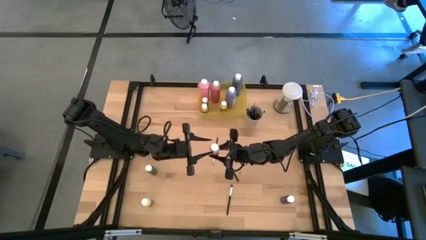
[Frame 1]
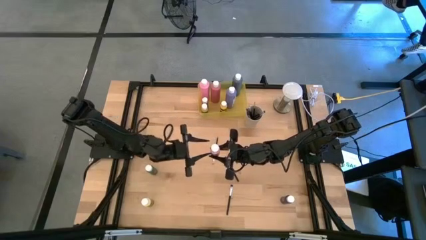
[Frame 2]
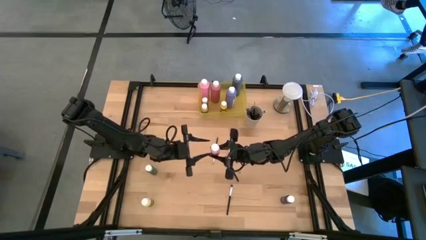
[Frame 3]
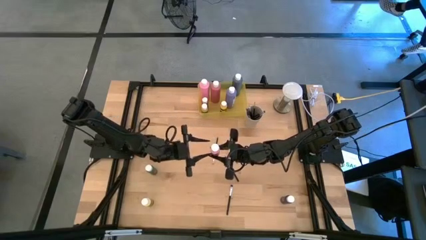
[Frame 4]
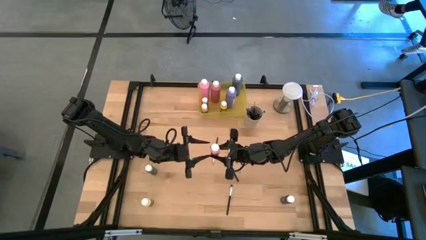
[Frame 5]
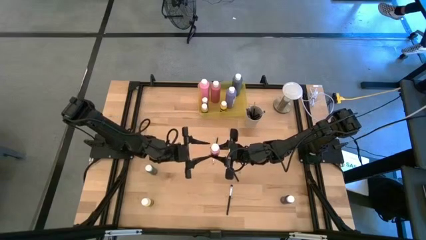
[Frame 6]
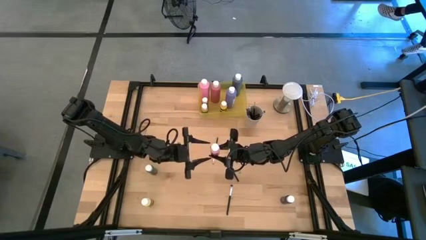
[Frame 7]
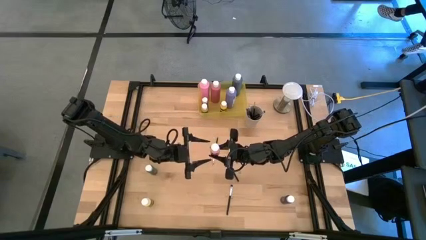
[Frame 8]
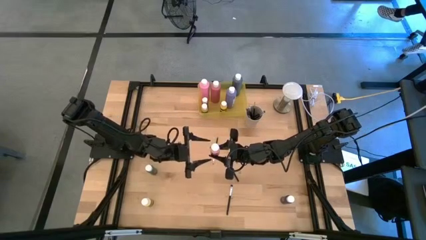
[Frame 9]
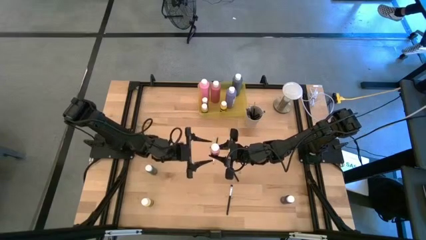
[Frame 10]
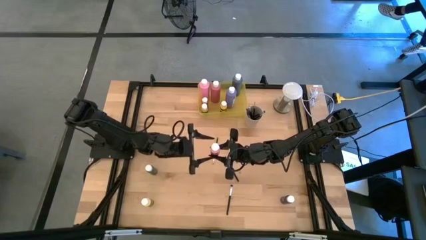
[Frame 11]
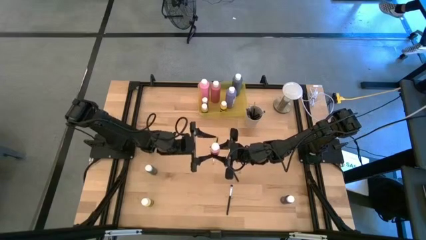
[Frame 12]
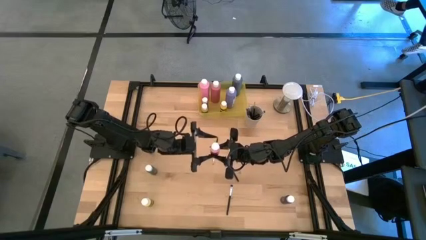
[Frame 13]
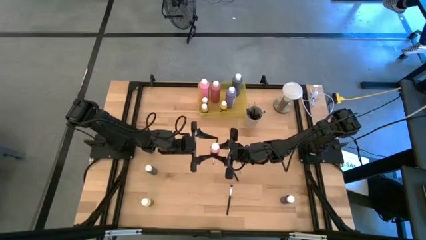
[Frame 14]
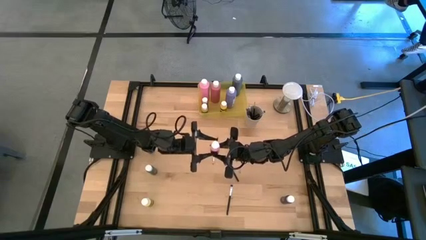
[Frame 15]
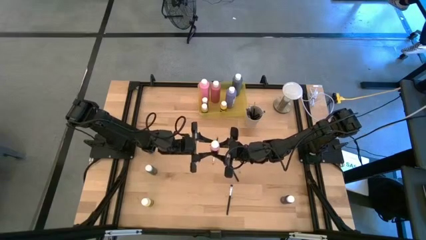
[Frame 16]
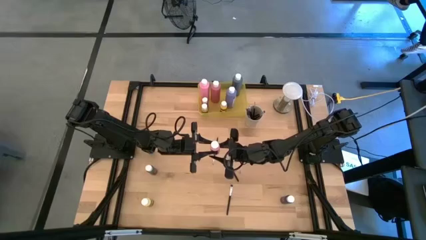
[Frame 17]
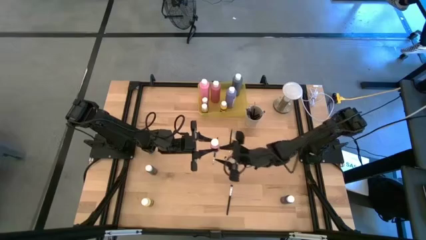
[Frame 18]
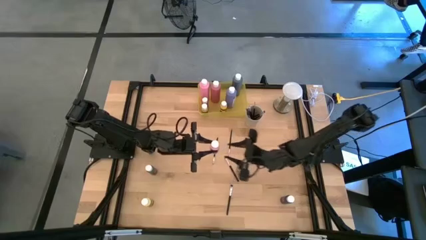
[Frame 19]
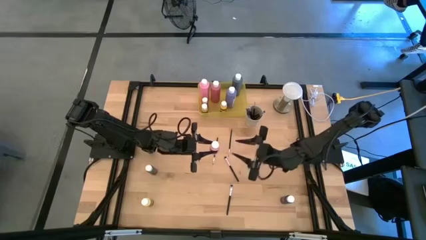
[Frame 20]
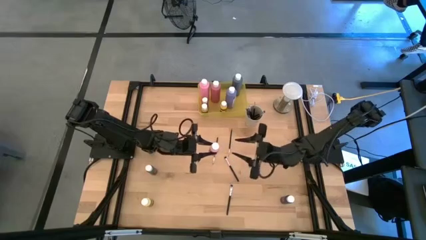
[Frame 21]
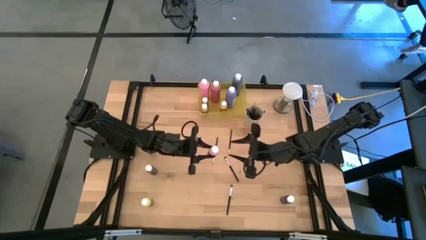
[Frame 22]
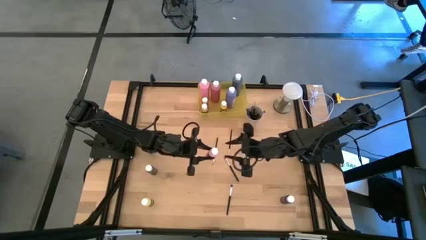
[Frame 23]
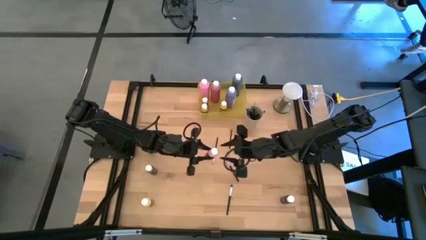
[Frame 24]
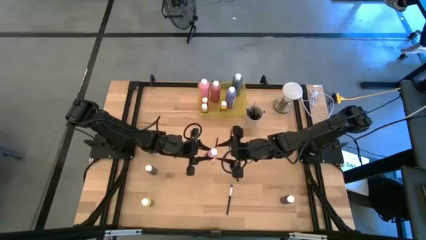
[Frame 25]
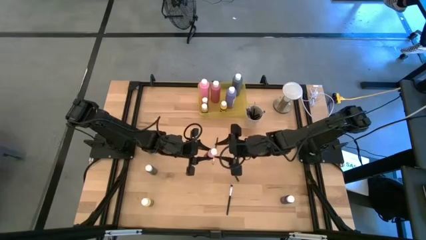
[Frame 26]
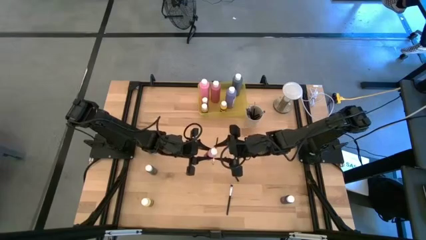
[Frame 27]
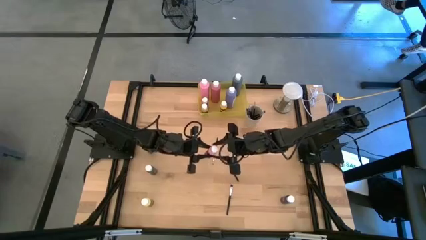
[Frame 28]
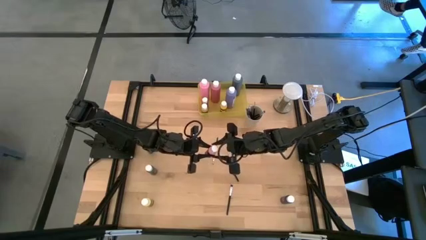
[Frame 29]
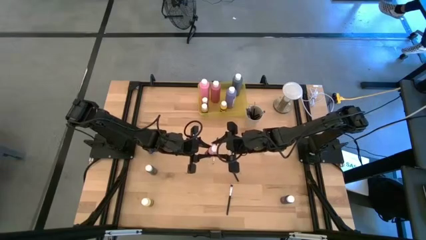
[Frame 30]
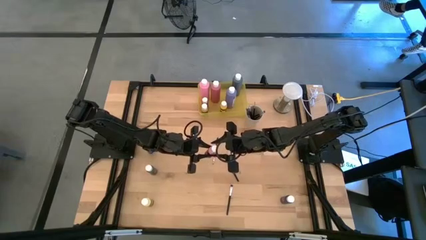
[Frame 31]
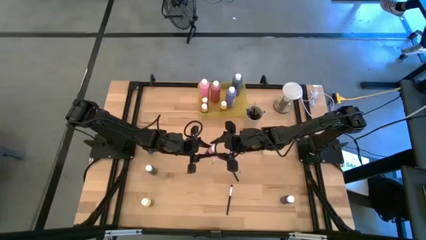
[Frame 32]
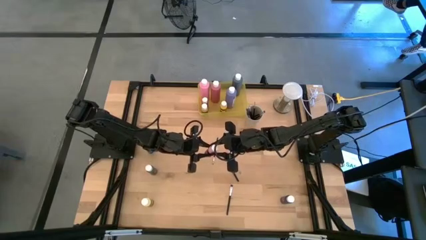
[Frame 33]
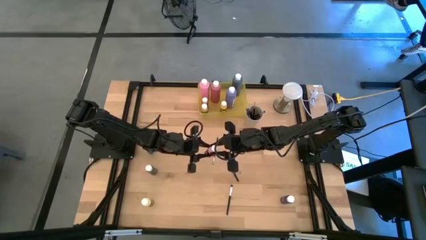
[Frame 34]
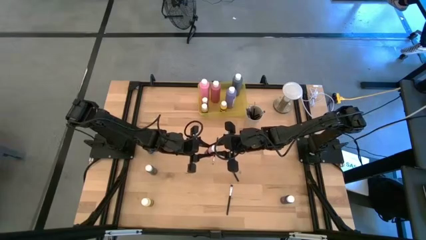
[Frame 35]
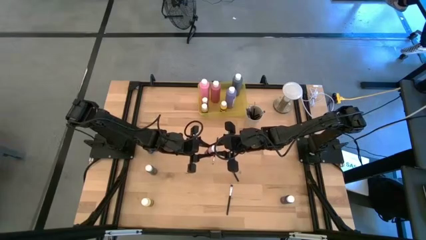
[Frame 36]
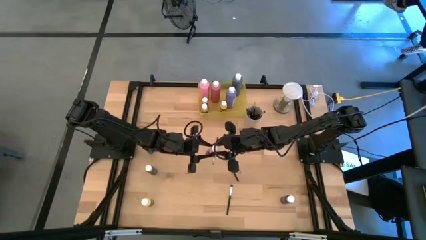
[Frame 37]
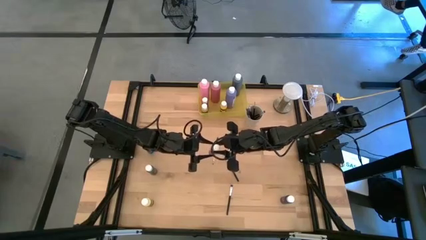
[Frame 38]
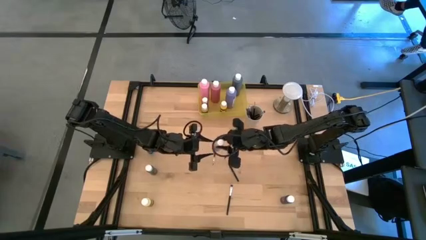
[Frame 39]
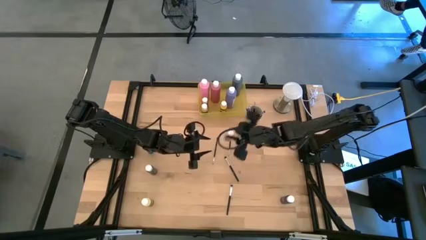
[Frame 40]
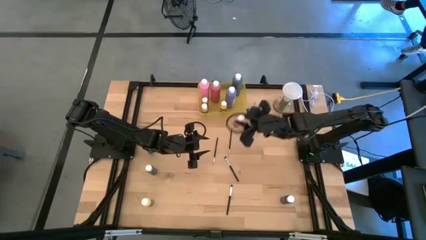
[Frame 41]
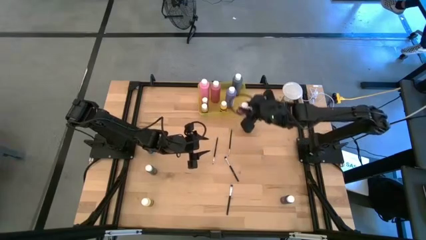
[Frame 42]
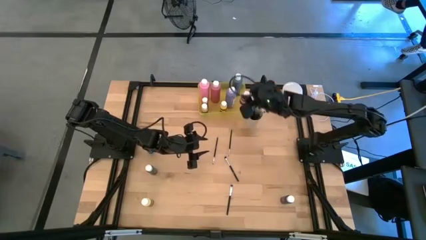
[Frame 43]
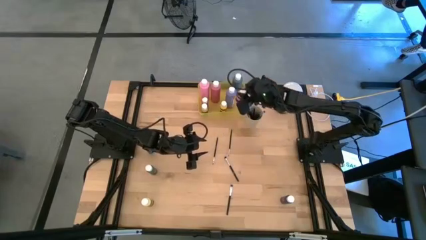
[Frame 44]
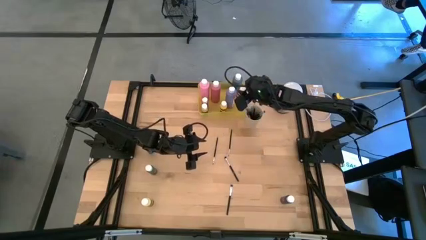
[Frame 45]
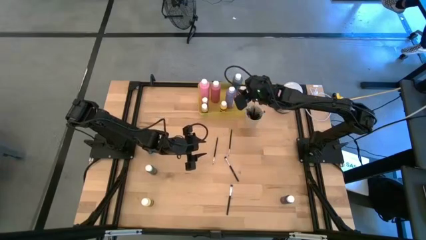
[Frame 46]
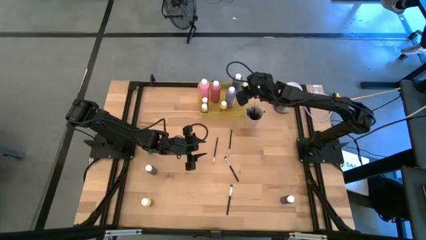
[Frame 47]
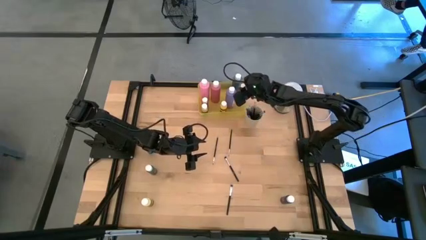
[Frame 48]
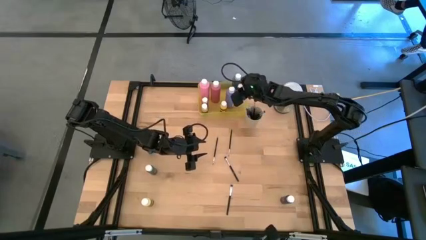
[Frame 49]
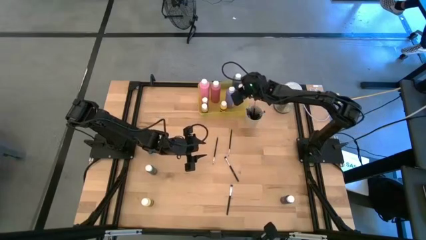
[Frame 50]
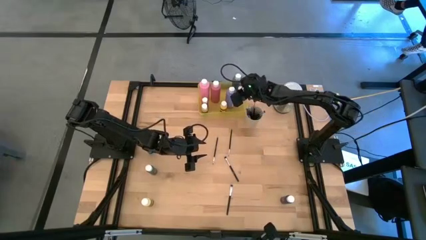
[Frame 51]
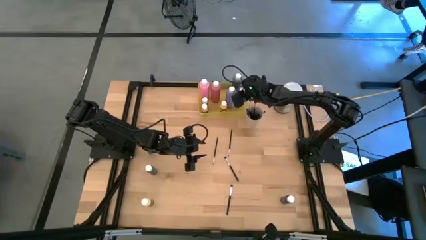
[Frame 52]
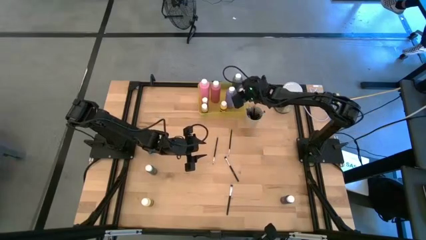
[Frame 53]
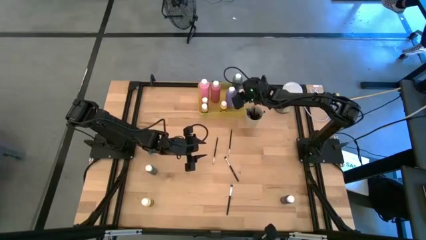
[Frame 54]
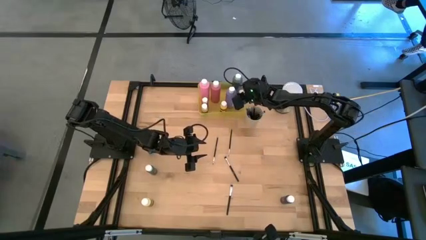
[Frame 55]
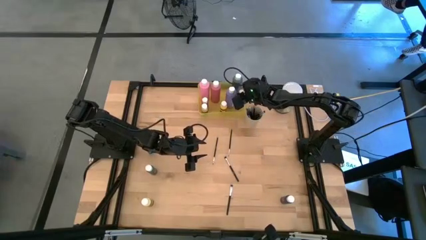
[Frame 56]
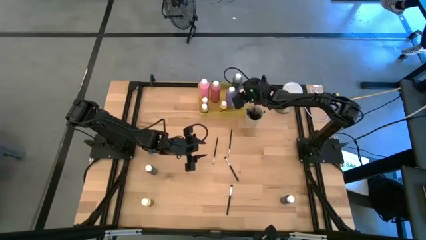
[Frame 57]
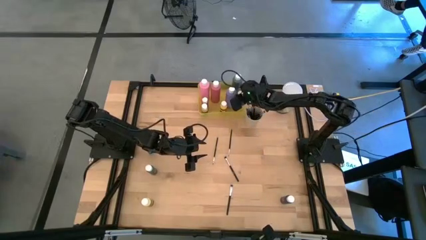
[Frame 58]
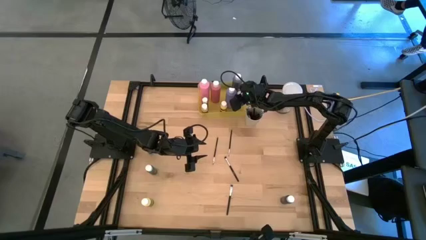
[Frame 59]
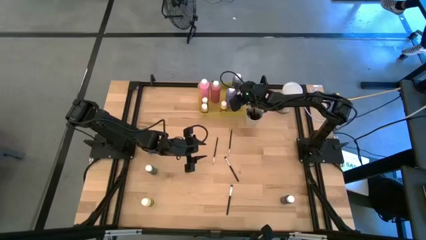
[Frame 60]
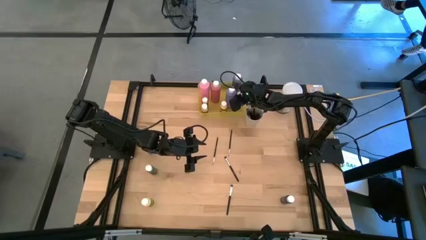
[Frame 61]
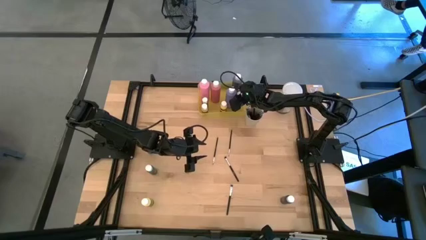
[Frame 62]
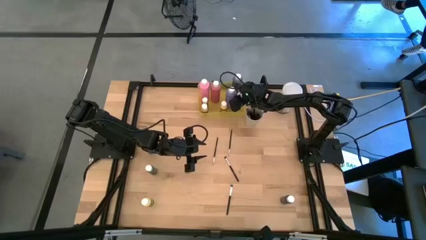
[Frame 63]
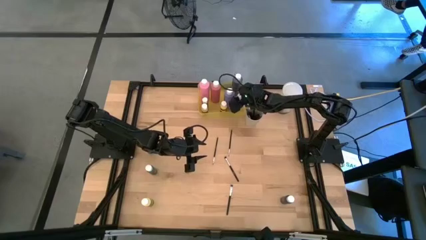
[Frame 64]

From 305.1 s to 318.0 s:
Task: Pick & Place Paint Supplies
Put the small pink paint bottle into the yellow bin

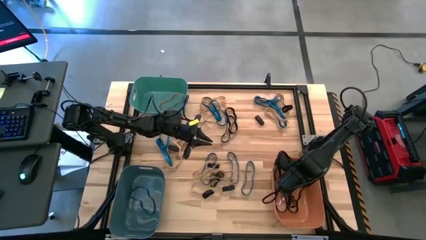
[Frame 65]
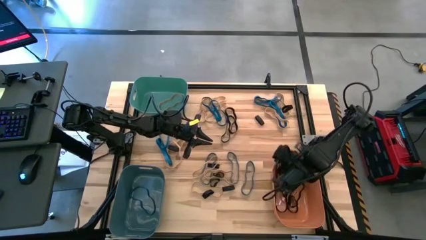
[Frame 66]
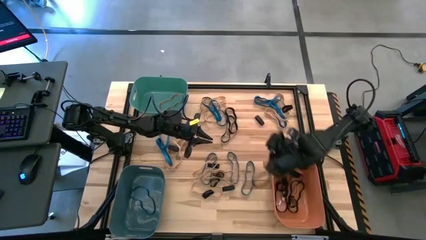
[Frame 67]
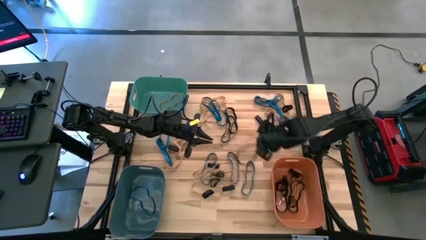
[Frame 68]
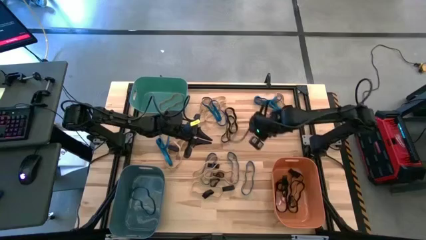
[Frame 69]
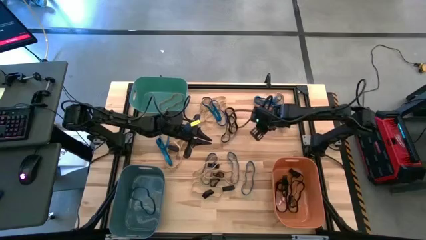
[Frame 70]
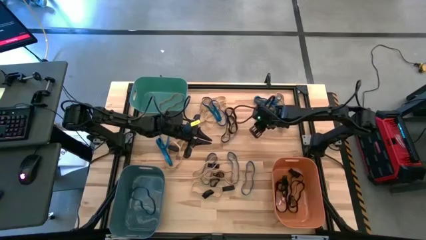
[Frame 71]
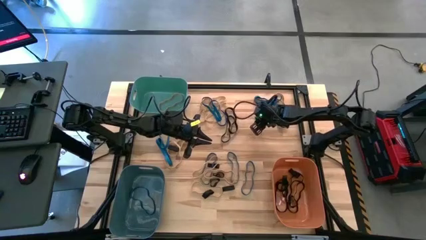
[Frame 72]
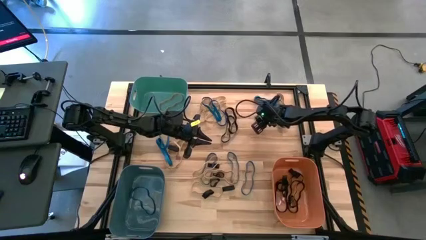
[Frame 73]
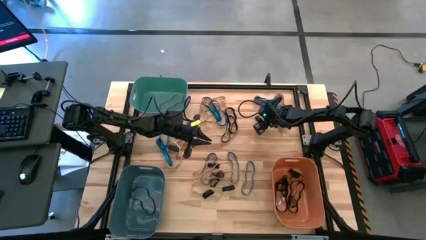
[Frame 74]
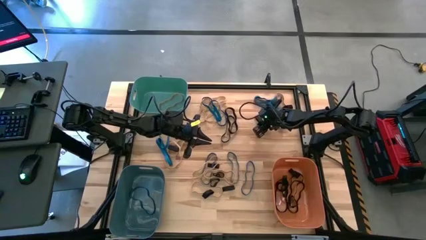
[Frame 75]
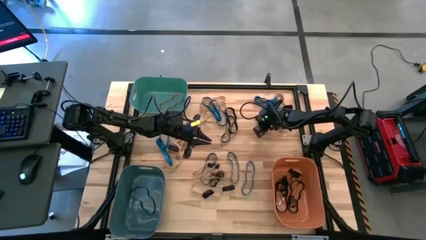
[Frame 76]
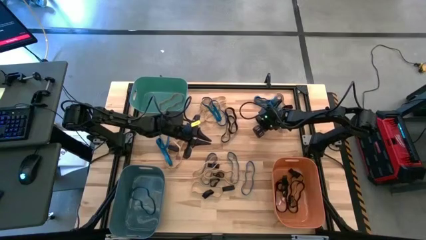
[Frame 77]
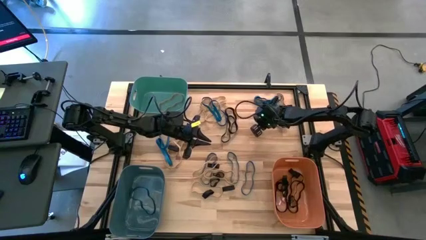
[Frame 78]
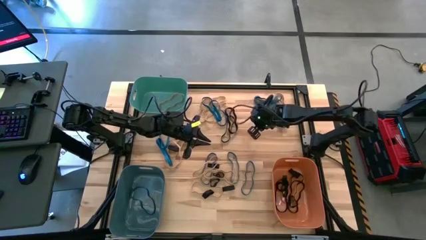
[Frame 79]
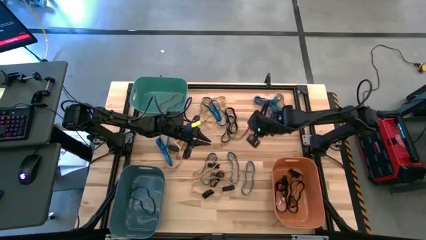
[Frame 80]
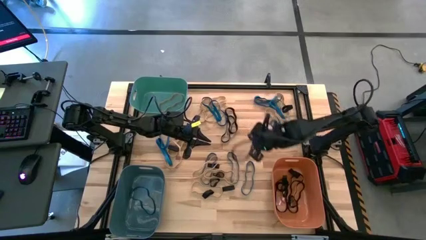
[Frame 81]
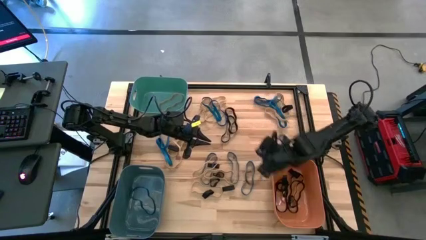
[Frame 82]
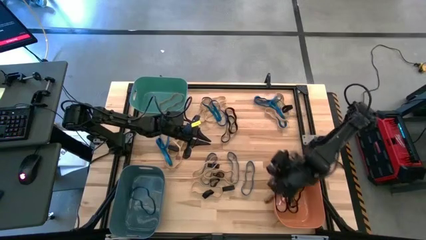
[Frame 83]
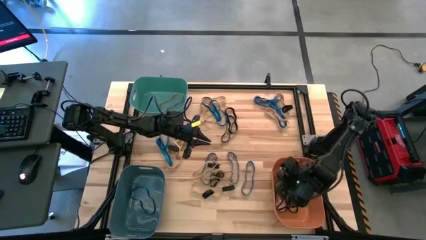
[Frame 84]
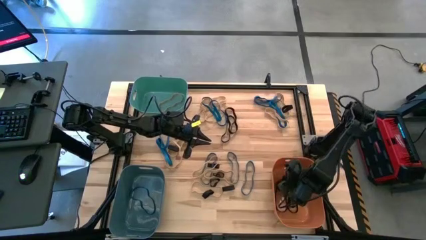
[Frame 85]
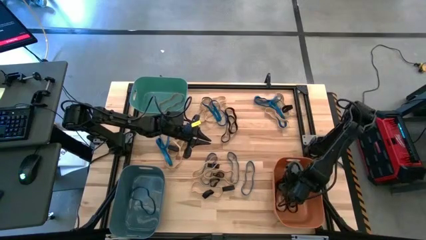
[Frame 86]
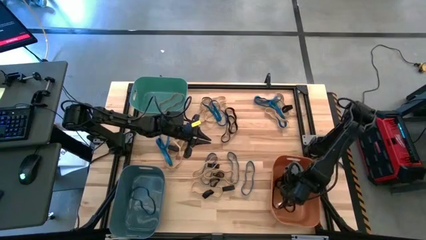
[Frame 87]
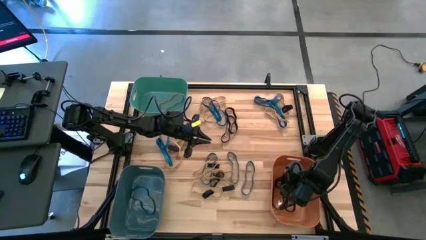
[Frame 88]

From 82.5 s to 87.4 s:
Task: Sort rubber bands into baskets
Put the black rubber band into the orange bin
